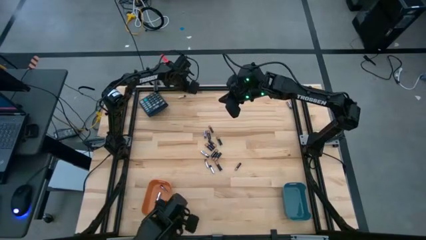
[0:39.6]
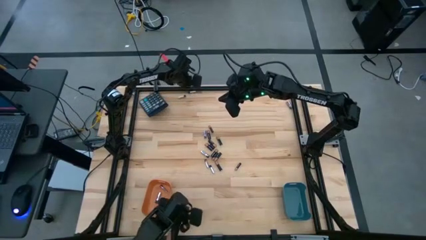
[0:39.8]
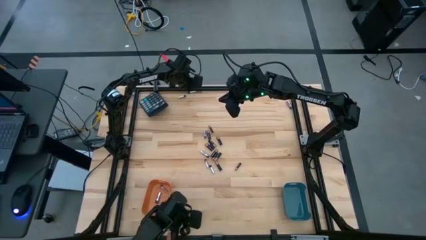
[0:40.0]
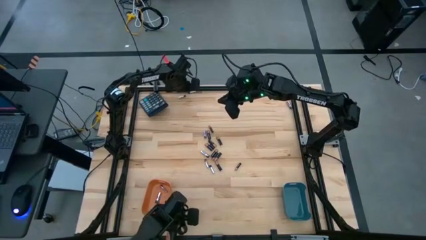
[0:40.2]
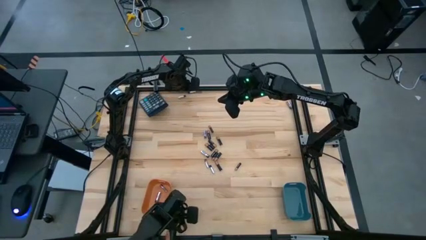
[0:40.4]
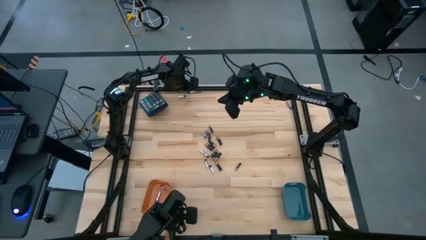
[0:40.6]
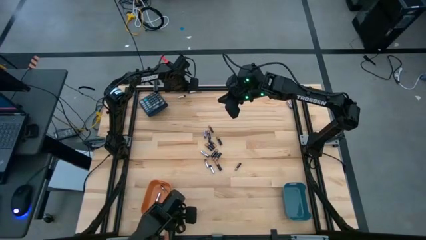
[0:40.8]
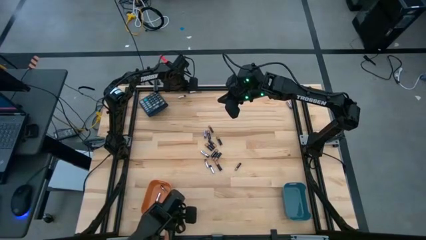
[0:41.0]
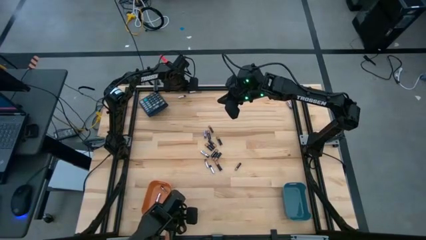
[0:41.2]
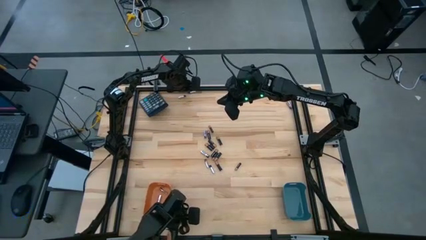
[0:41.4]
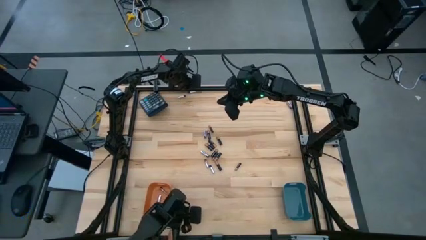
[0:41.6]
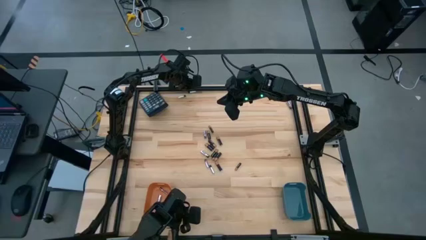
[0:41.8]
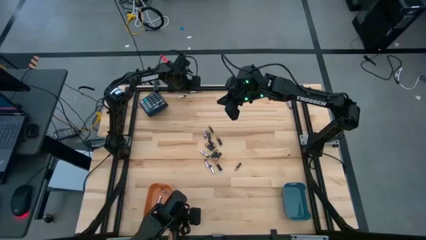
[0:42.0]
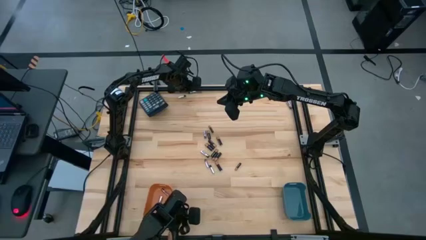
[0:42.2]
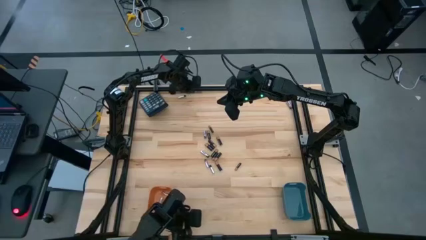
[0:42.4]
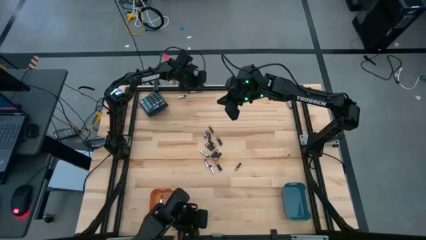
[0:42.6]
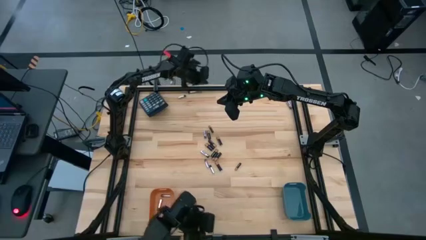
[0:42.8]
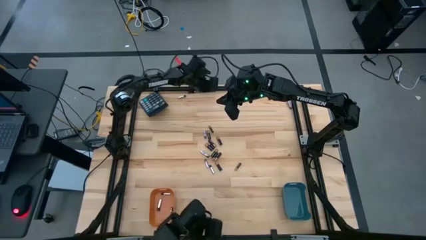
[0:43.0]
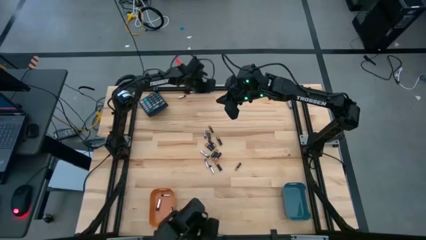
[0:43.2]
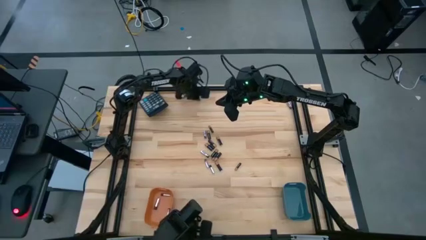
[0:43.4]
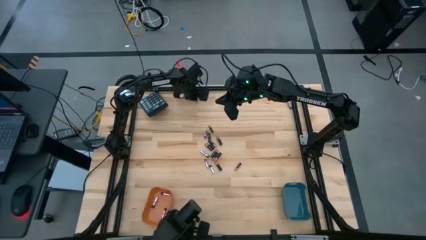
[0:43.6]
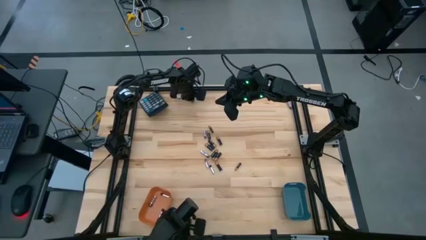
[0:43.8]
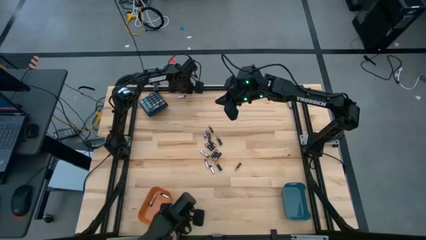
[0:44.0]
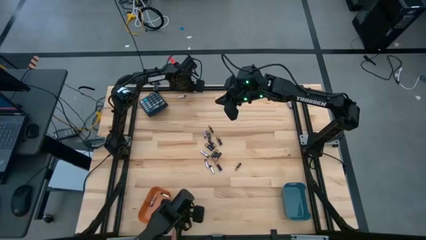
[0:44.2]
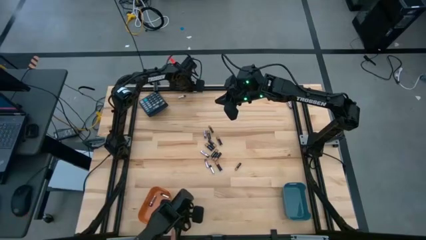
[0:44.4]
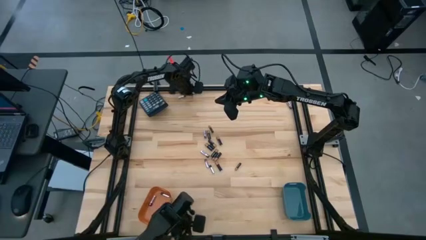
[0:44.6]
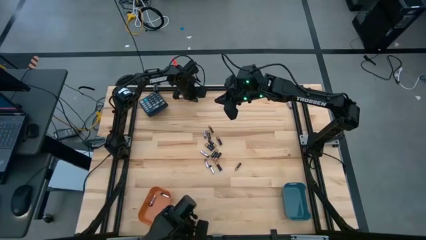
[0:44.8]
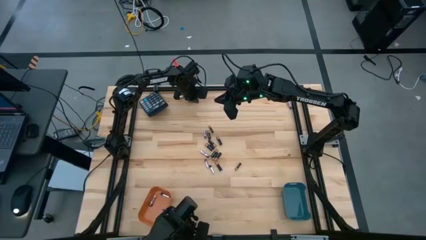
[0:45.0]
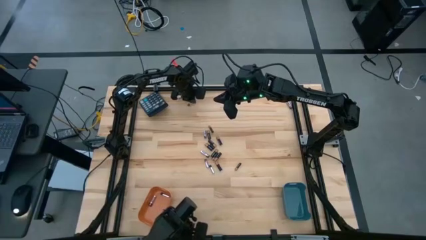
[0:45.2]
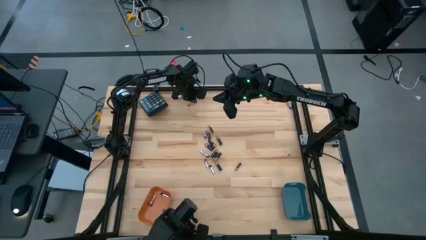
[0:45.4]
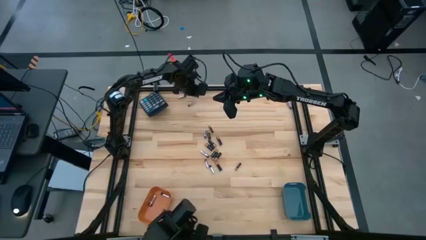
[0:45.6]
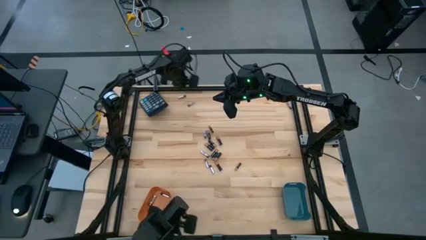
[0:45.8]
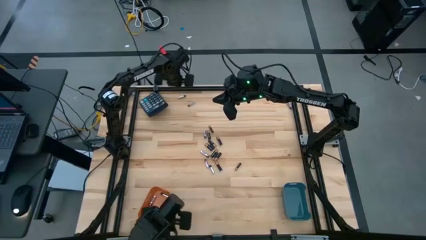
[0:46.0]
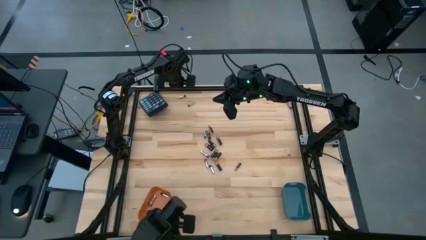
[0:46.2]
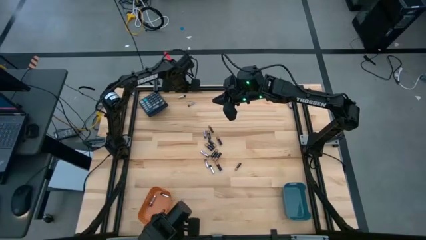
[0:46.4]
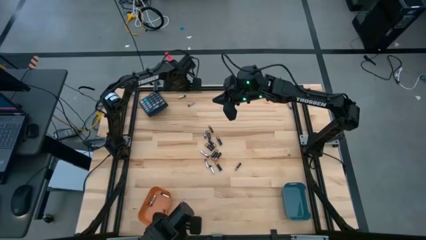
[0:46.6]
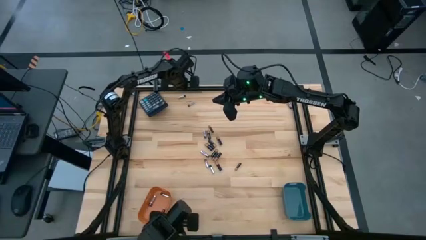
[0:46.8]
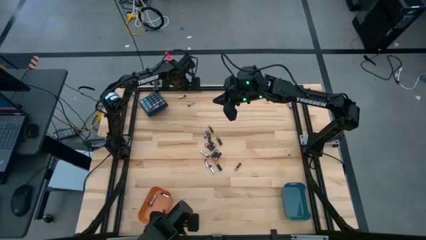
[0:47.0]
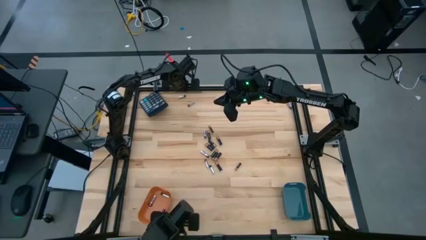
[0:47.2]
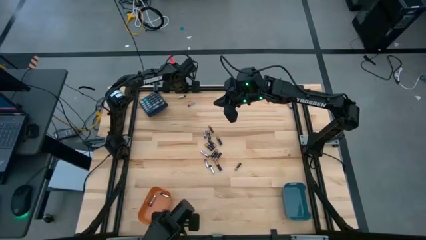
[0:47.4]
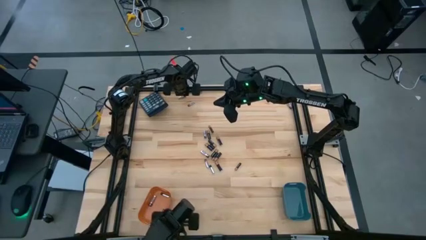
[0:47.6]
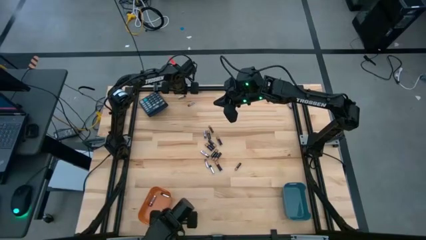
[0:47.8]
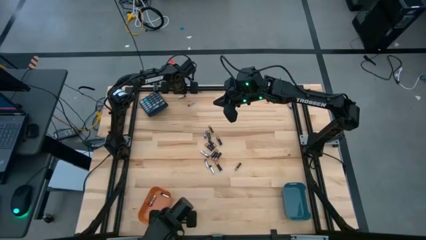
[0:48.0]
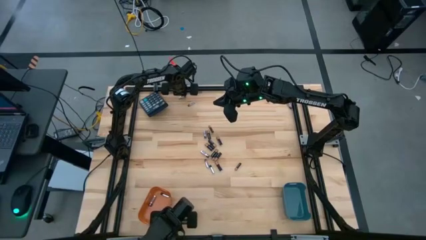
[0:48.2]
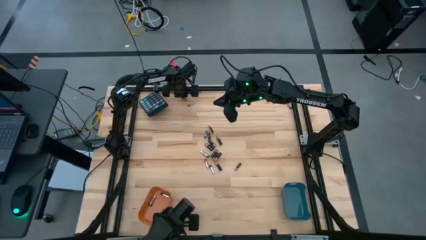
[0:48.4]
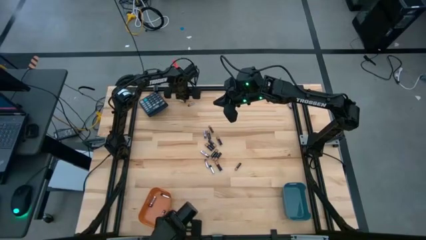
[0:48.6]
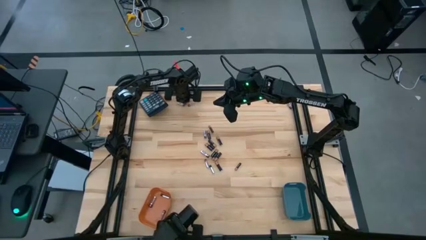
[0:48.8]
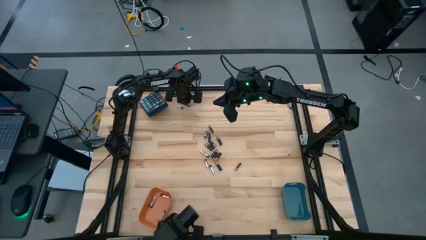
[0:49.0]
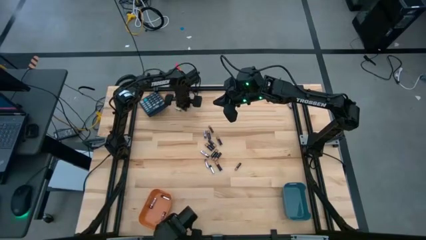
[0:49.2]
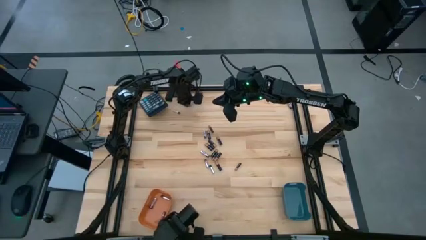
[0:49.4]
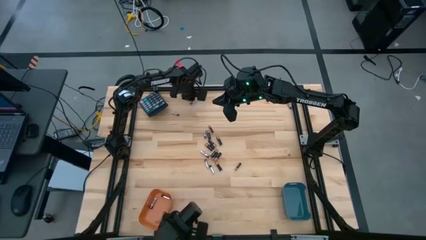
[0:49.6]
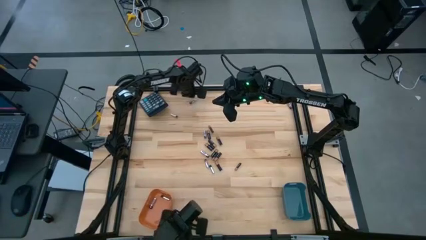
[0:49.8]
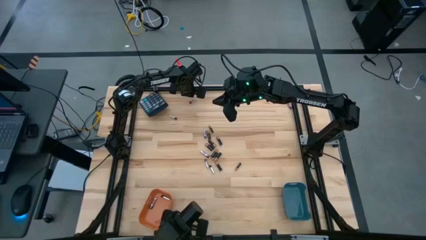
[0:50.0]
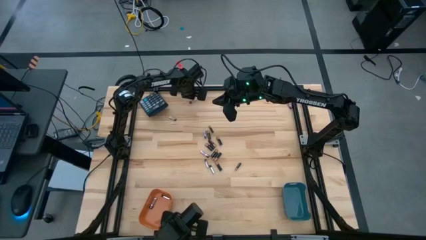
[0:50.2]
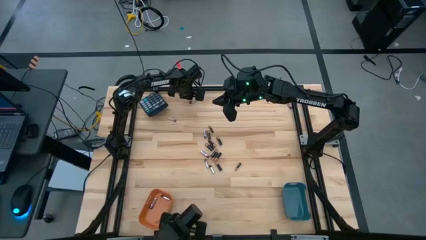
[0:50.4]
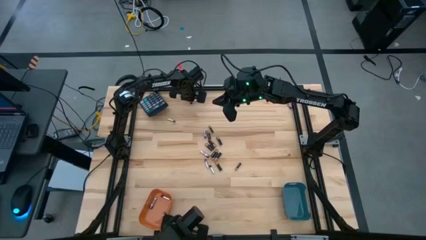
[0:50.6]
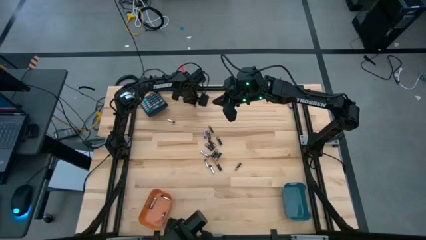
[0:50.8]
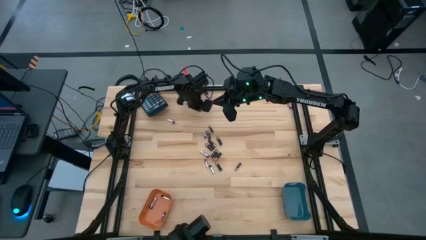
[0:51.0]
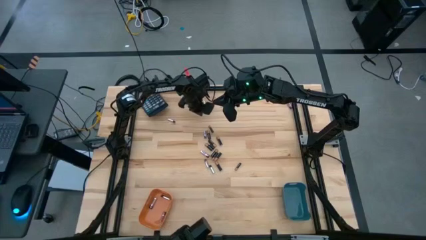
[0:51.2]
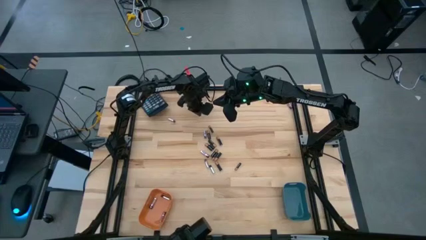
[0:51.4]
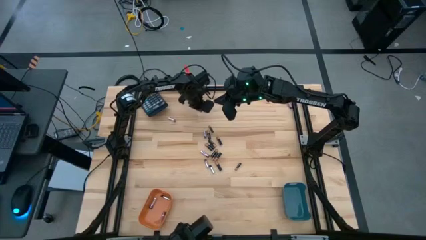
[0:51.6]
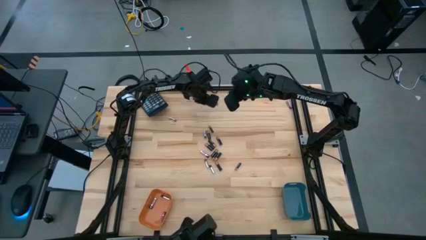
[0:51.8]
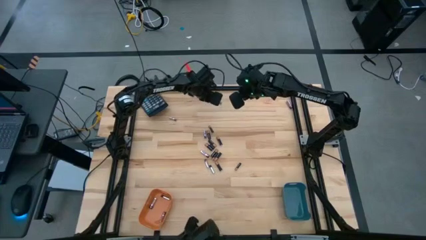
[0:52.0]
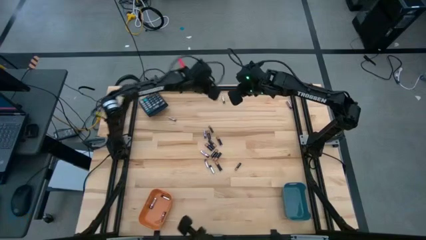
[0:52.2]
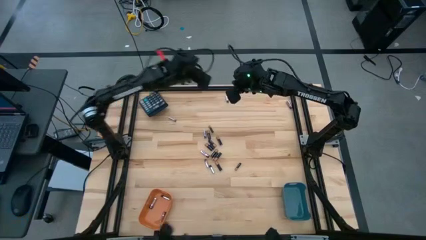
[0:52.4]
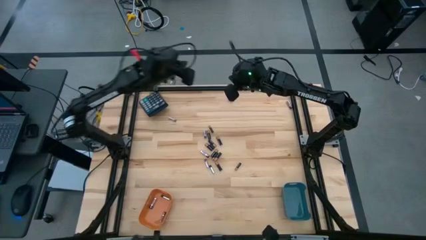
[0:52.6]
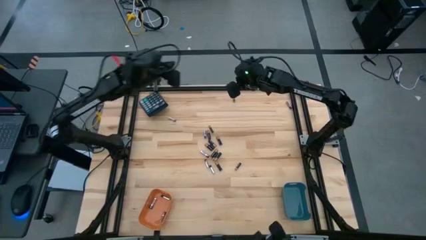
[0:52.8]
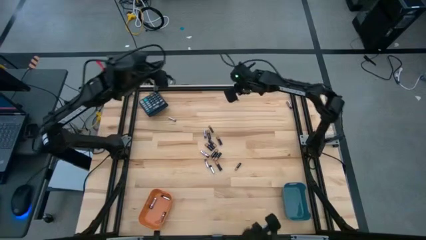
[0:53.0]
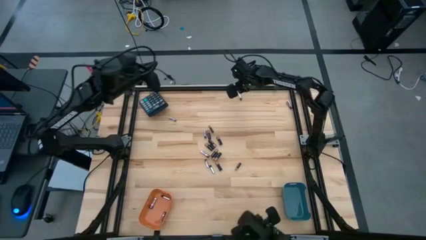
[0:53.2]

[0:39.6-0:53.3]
Task: Sort batteries
Put the silver battery into the orange bin

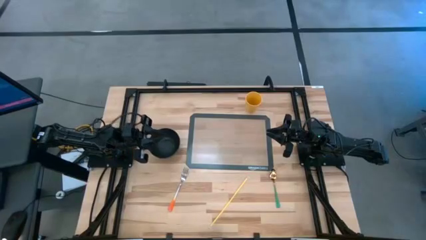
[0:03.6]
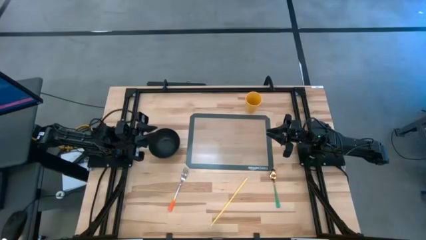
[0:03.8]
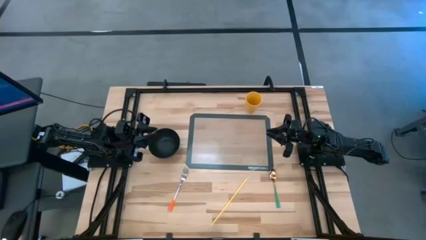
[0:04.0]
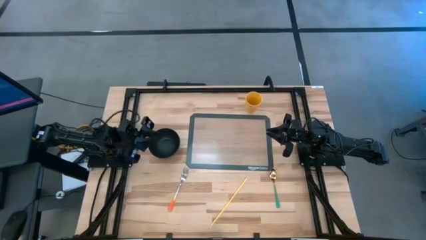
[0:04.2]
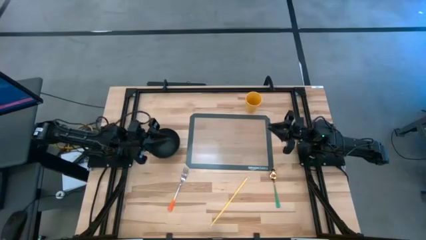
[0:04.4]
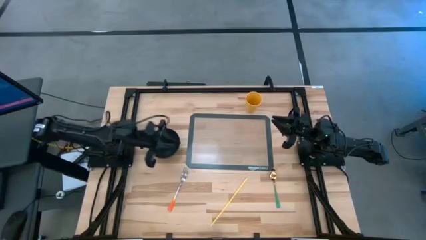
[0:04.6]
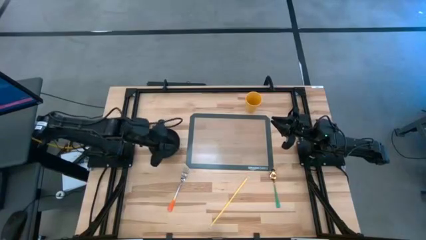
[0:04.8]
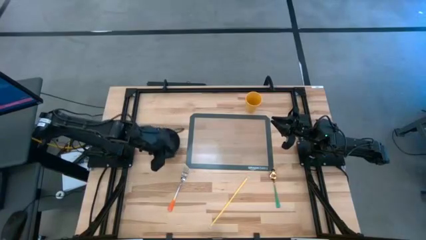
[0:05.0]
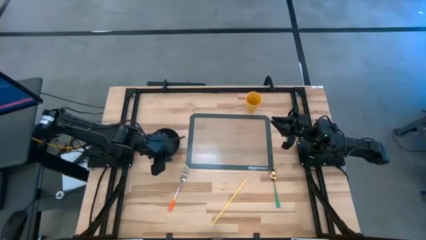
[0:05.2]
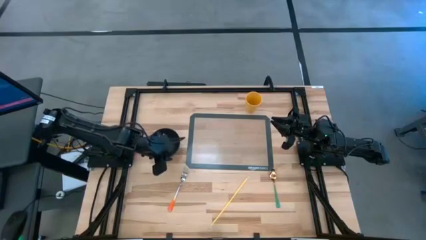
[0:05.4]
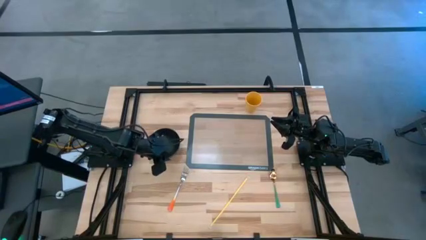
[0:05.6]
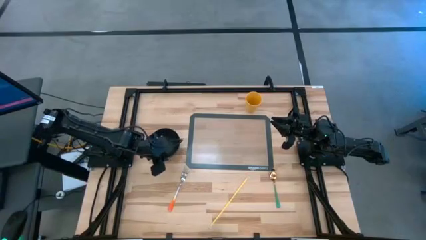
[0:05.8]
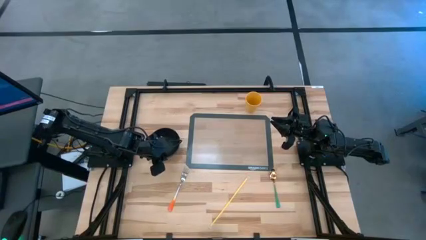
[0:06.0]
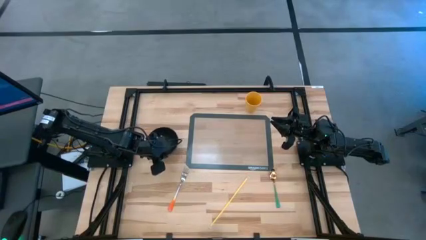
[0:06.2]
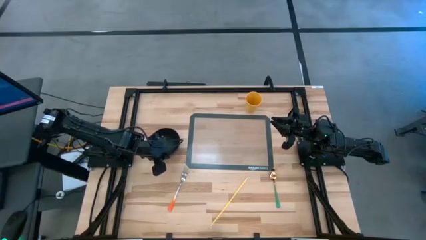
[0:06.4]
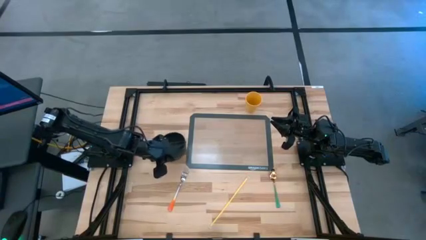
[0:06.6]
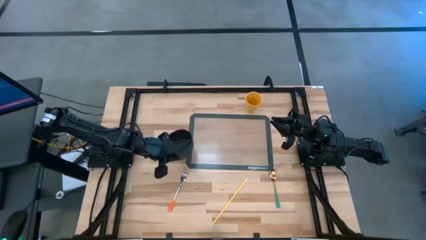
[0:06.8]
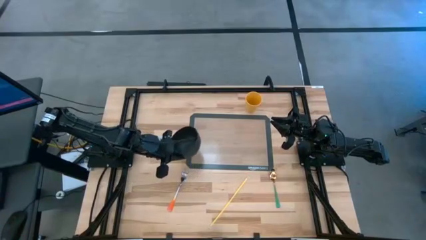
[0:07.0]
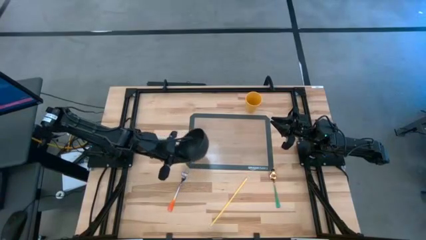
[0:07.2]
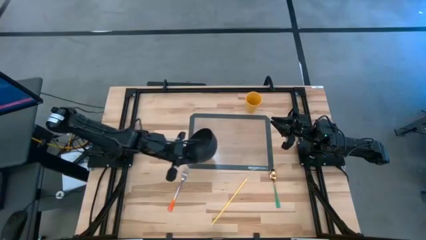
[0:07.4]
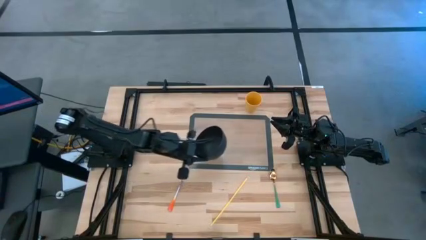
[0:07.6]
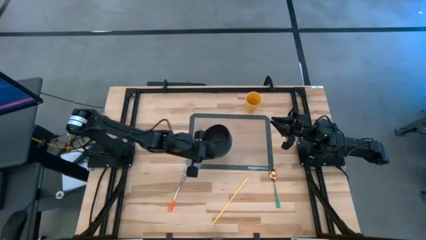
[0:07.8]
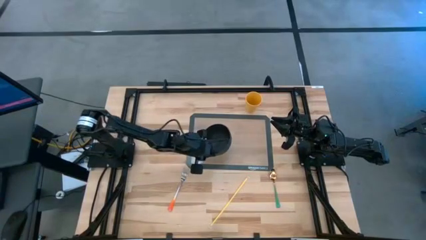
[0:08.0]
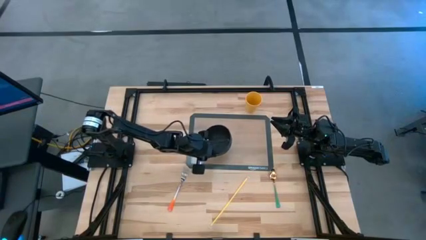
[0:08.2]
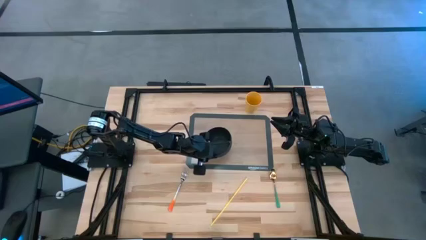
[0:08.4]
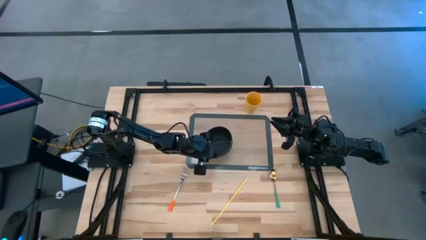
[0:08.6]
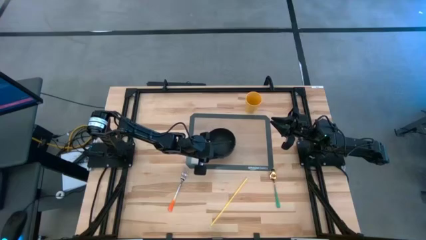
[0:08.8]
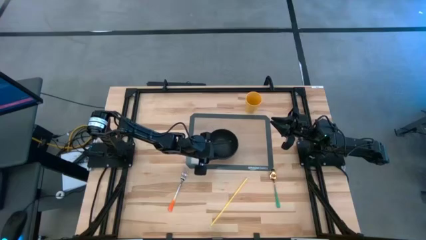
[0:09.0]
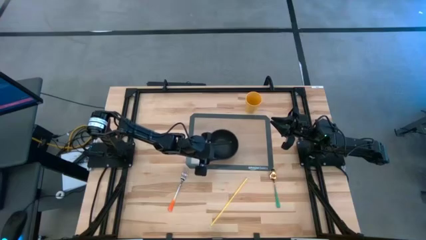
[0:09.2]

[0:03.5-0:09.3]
Task: Pick & Place Utensil
Put the black bowl in the center of the transparent mat
